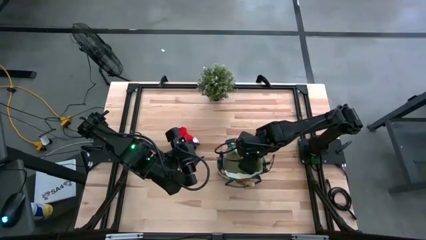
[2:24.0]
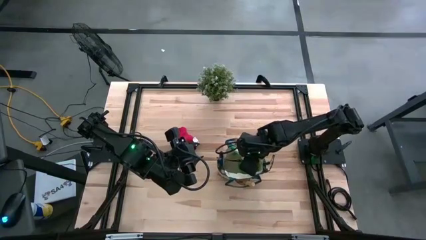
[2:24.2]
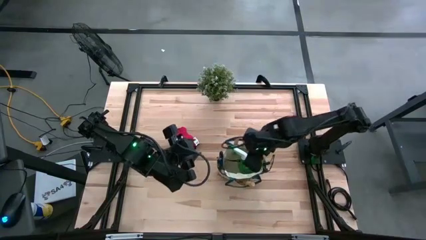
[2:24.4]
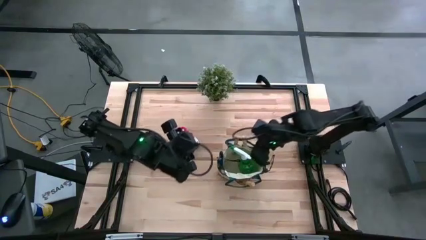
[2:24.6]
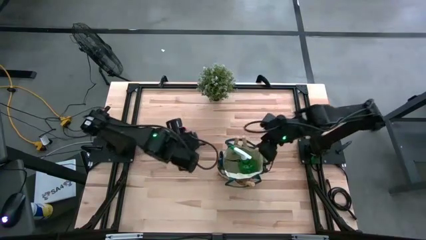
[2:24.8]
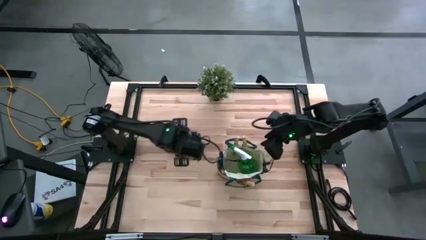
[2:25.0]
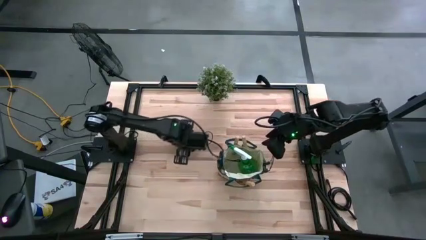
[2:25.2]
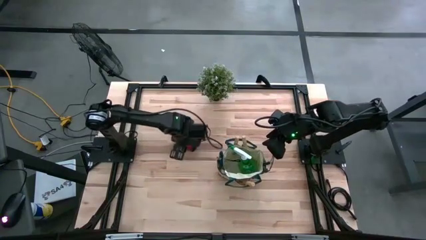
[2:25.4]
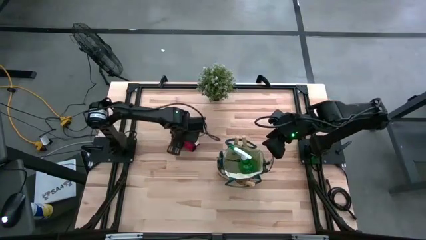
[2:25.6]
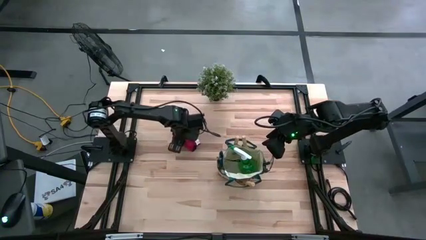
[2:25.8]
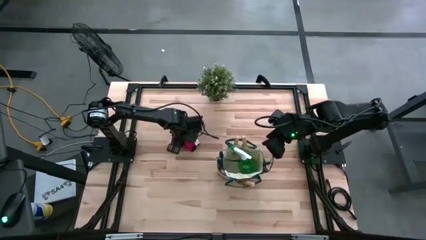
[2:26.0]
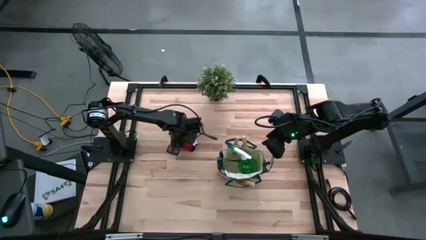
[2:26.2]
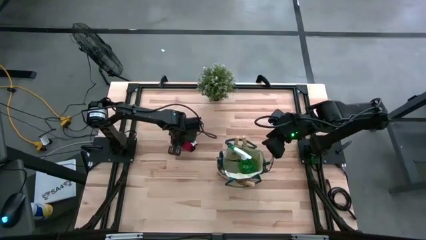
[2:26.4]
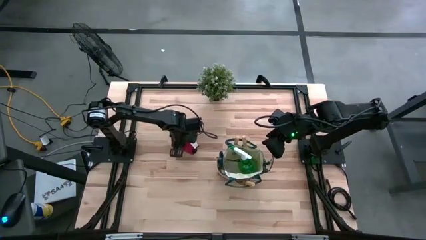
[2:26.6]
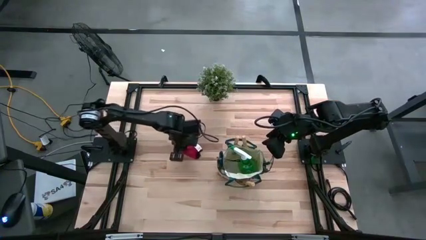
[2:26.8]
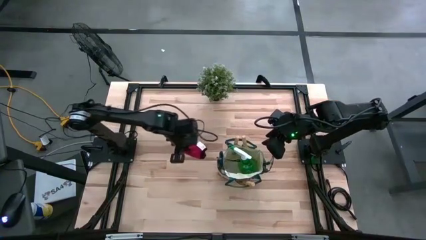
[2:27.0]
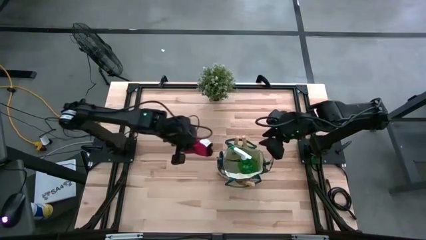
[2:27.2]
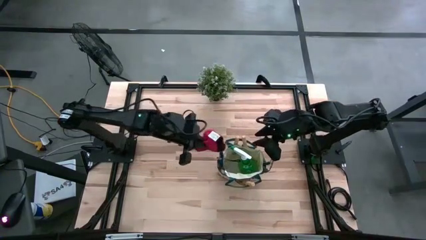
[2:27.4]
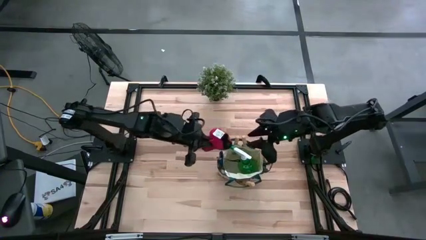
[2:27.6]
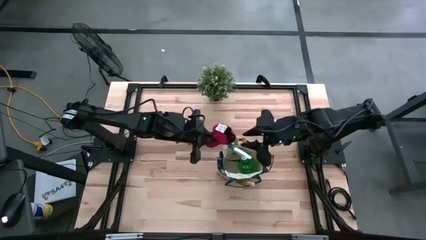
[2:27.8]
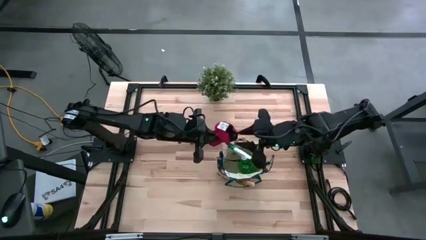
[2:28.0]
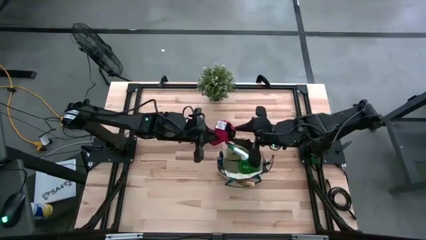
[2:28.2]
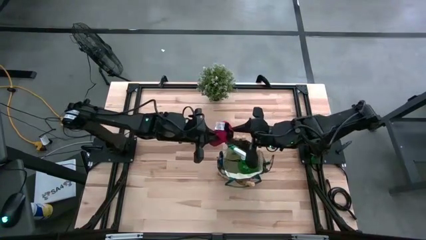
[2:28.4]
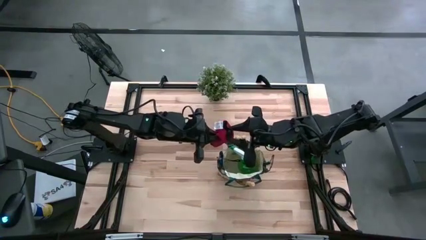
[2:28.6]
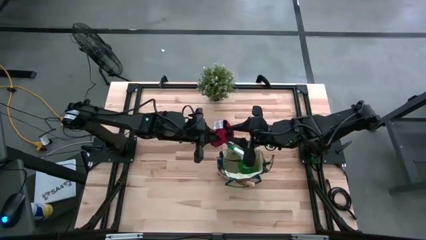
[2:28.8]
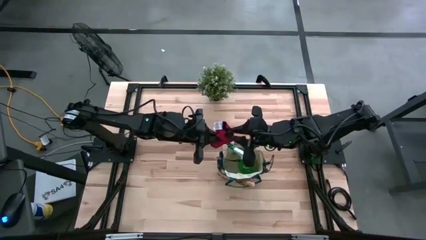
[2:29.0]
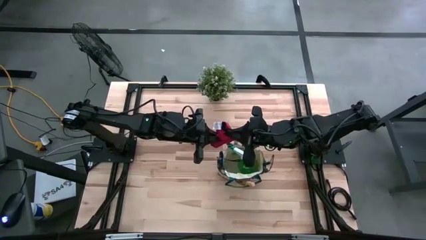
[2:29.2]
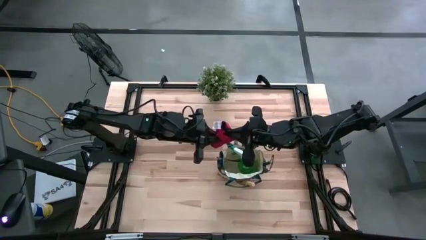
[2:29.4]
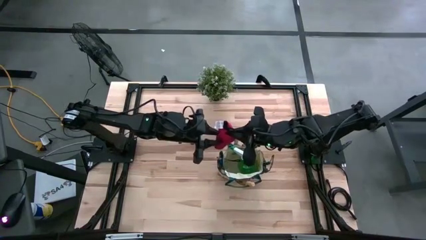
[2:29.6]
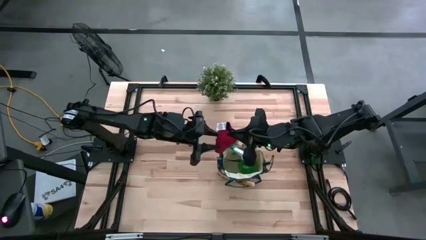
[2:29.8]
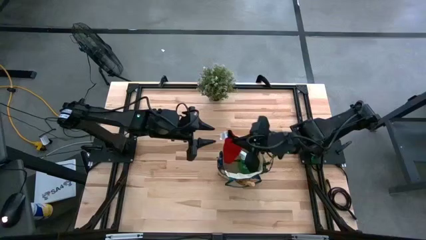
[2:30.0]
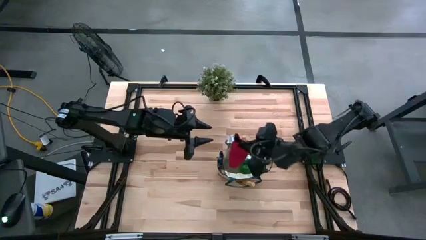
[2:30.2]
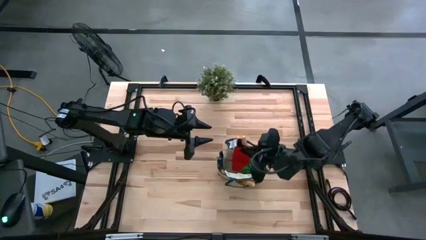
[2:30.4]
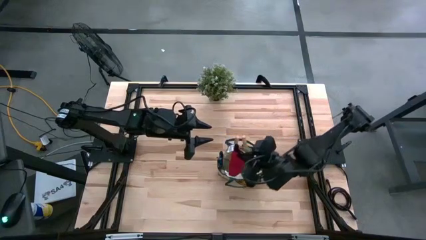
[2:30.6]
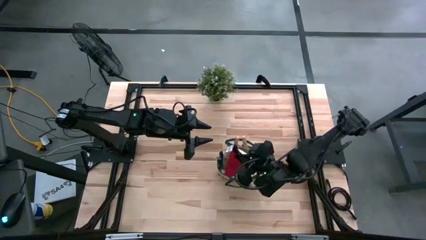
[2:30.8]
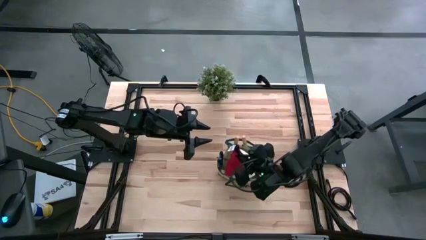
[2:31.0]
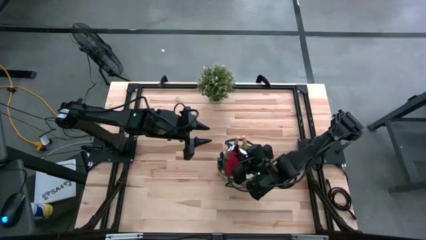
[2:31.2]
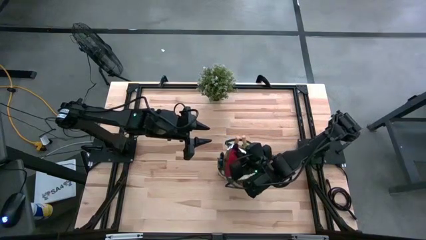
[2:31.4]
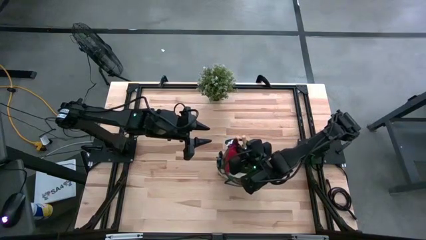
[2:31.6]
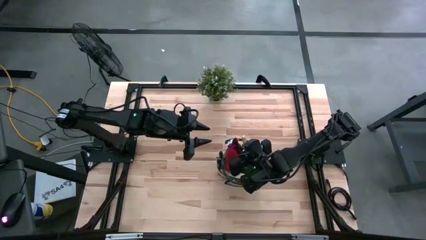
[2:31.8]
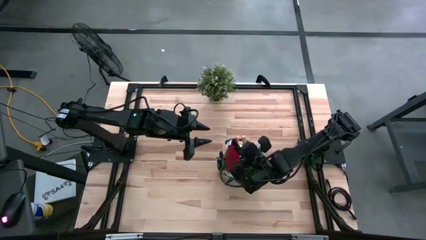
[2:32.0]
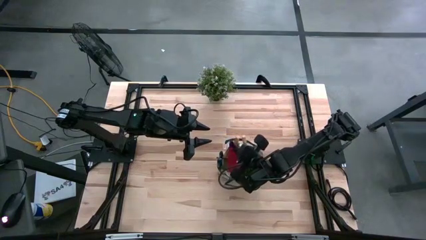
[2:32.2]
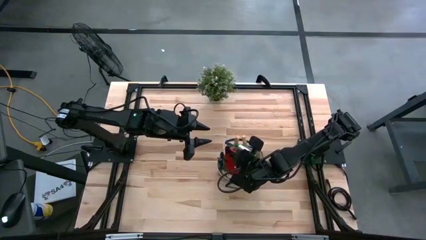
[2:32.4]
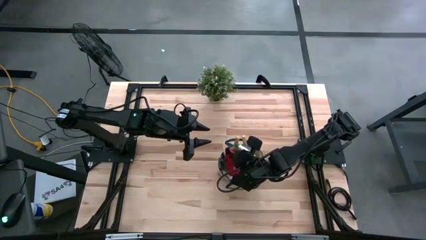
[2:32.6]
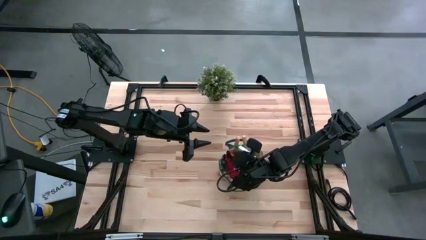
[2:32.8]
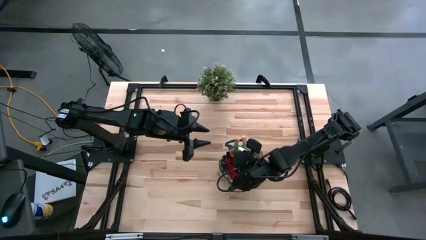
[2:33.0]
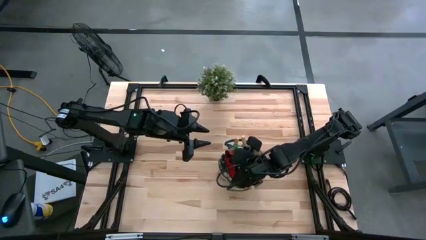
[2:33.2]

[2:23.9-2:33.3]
Task: Pick & Place Garden tools in Gardening bag
Put the gloves into the gardening bag

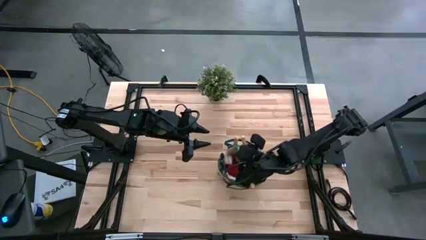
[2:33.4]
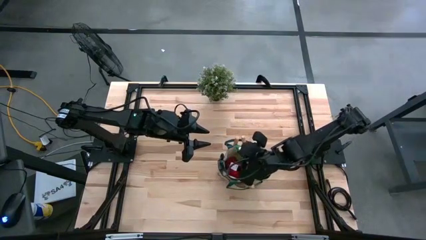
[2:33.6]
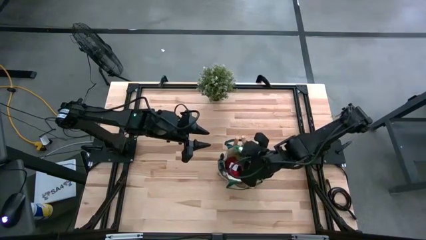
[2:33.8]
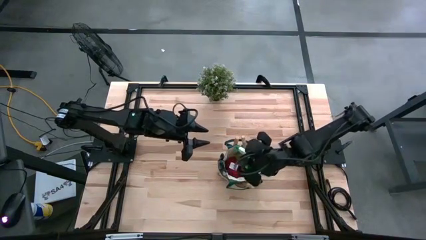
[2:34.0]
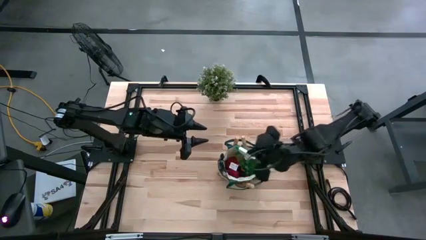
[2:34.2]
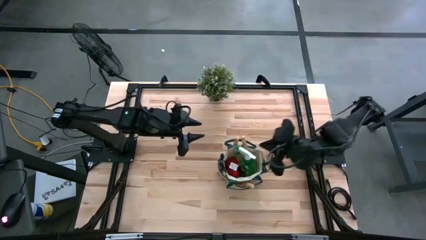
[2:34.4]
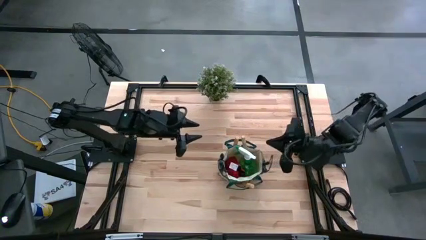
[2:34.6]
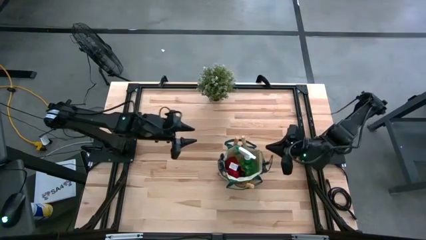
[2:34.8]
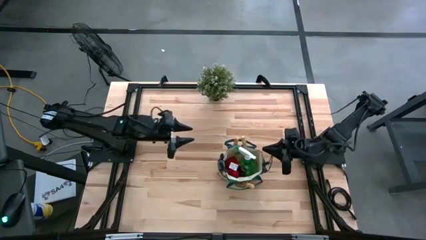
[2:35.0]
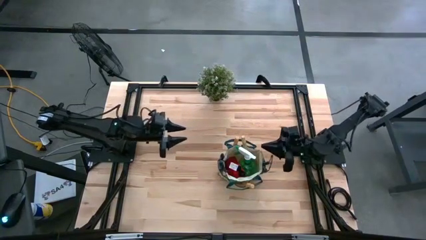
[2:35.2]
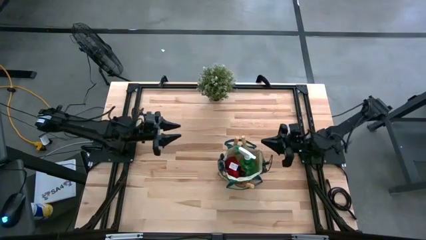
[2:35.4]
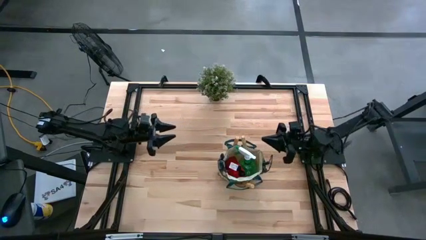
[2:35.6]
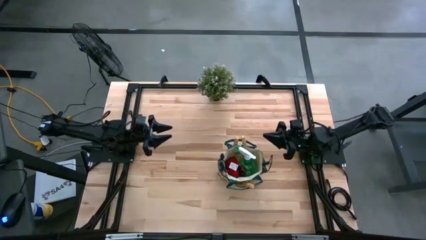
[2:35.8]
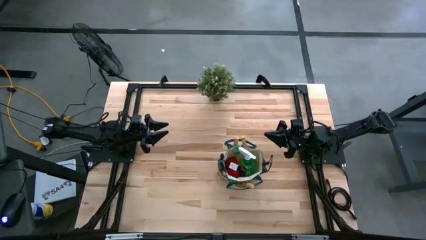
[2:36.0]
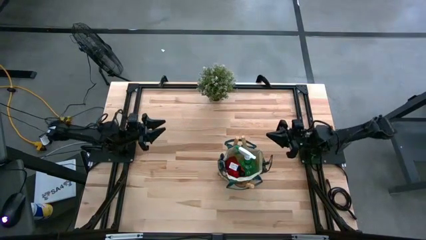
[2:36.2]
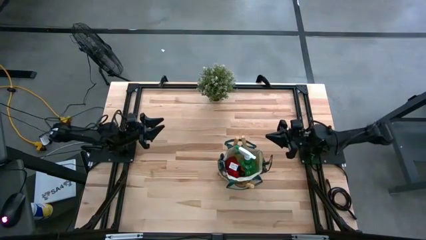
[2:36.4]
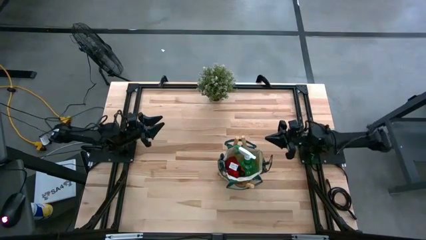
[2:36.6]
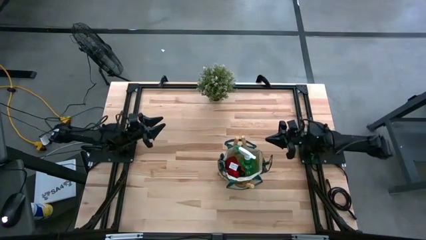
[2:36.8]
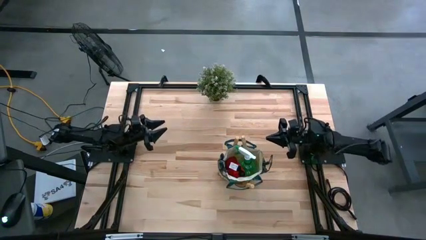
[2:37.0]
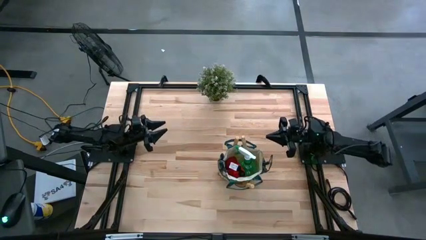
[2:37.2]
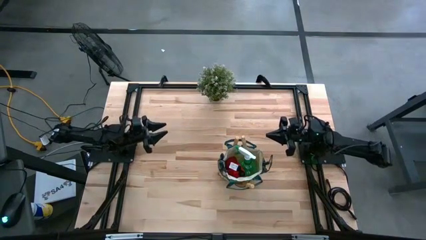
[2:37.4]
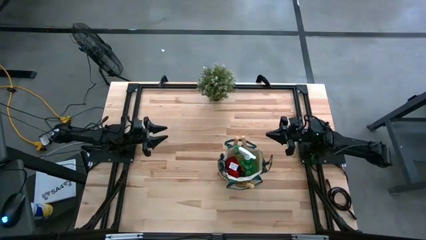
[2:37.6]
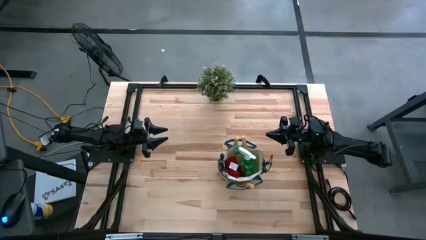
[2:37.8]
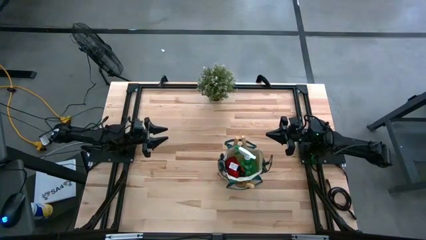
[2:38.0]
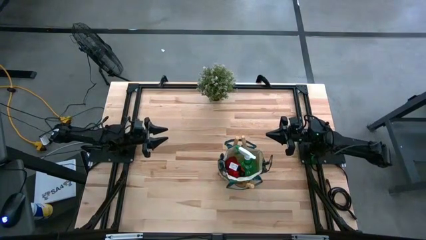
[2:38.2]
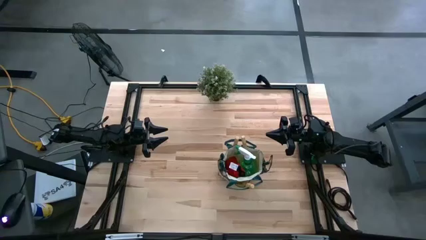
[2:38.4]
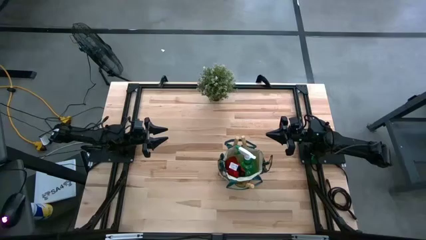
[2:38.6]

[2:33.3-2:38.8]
Return to Home Position

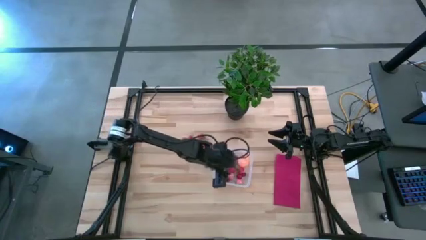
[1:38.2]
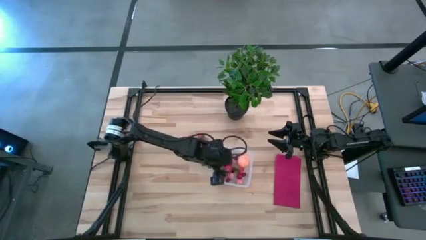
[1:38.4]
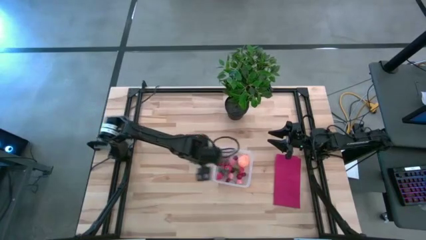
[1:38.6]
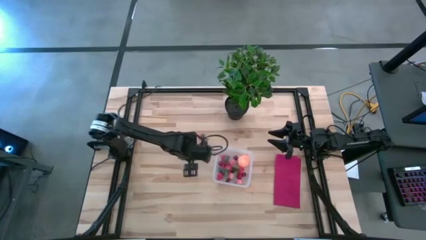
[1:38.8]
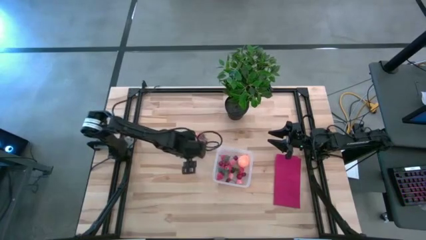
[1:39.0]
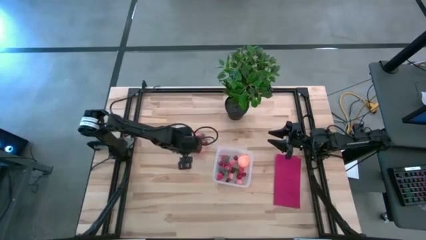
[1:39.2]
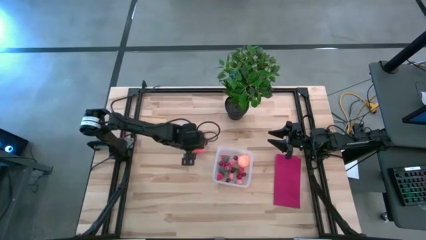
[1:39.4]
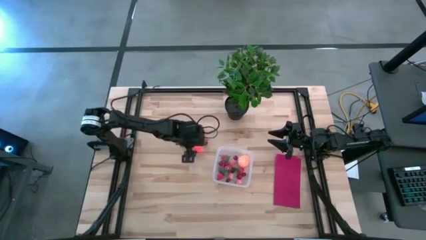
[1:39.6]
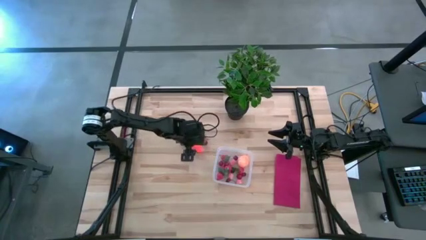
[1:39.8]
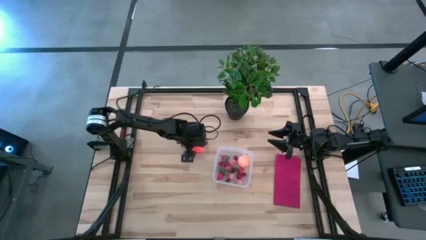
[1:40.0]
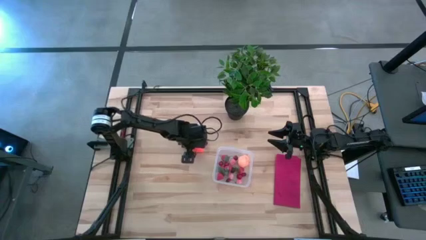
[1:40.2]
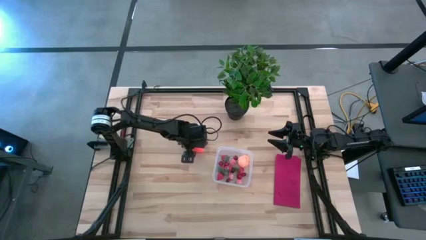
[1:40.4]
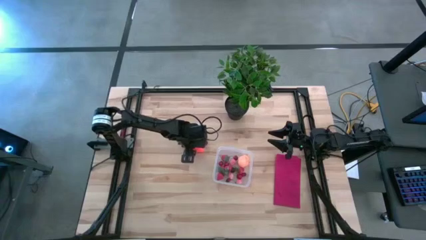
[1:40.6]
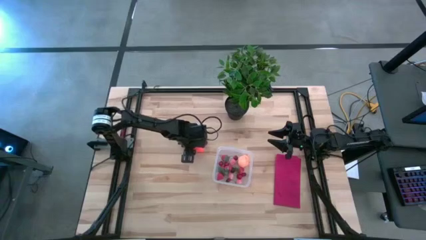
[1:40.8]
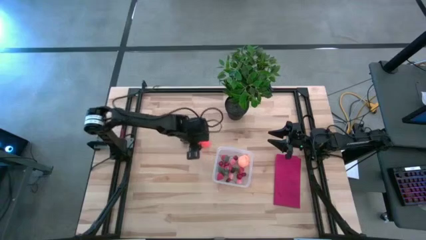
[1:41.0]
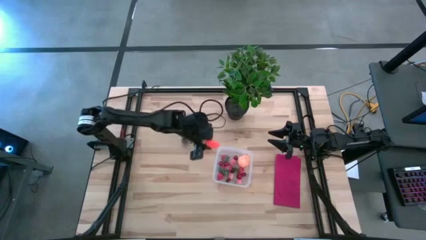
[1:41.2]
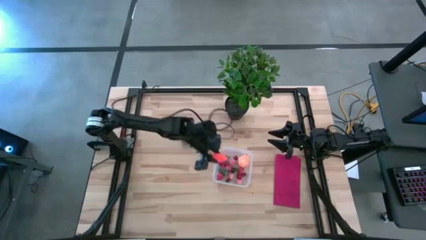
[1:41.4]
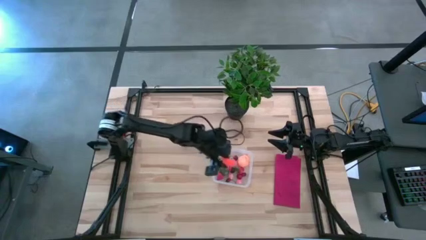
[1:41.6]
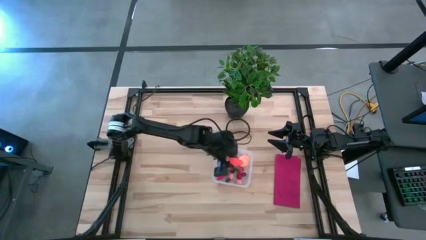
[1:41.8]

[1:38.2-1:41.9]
Task: Pick and placing Produce into tupperware
Put the orange carrot into the transparent bin
